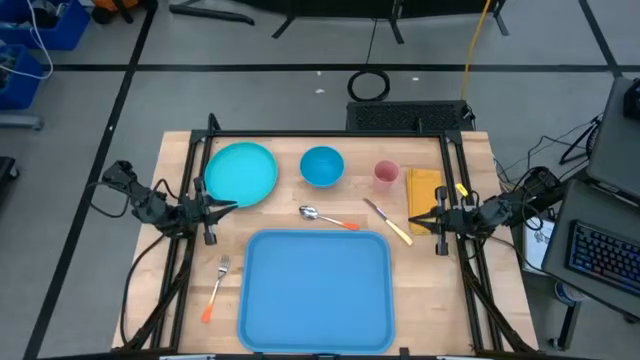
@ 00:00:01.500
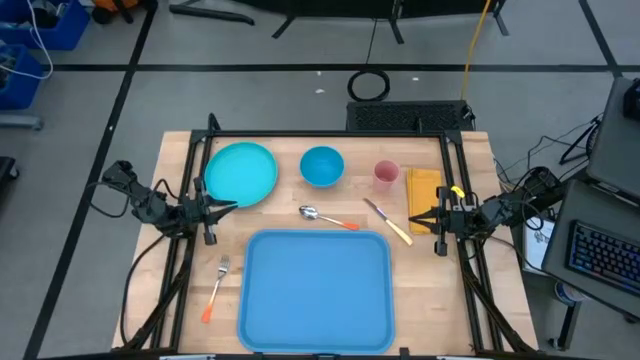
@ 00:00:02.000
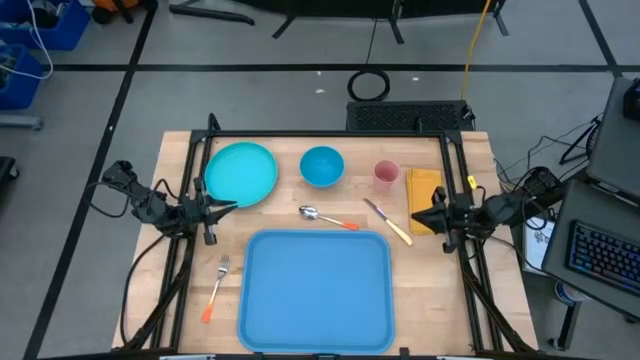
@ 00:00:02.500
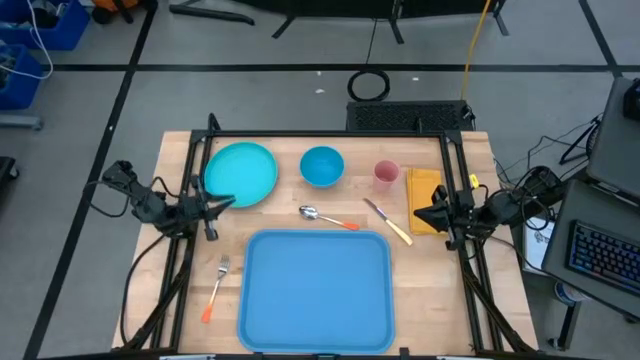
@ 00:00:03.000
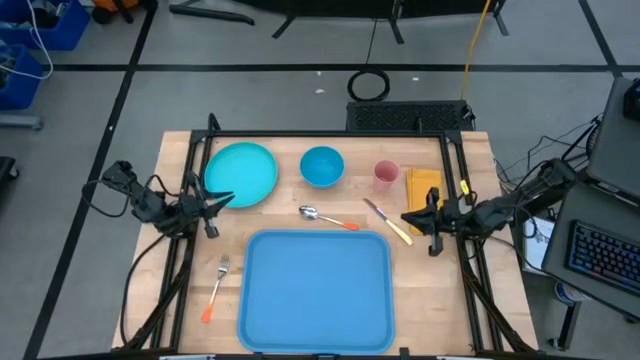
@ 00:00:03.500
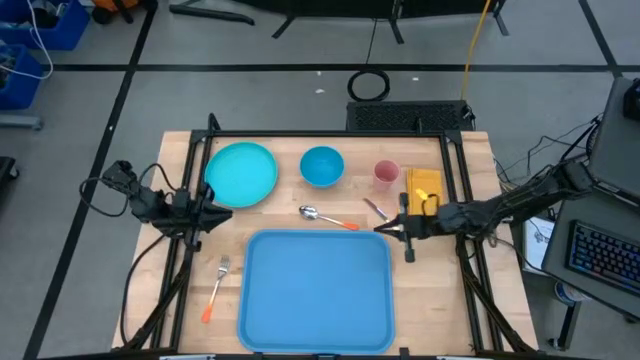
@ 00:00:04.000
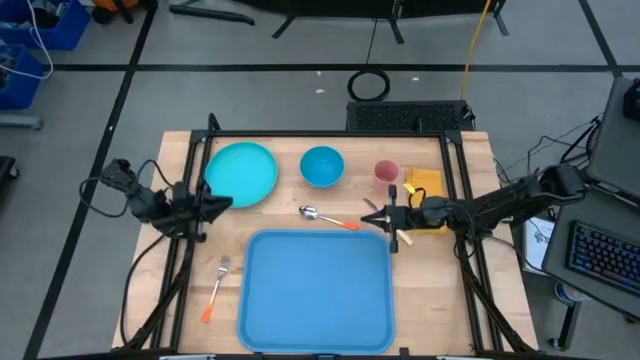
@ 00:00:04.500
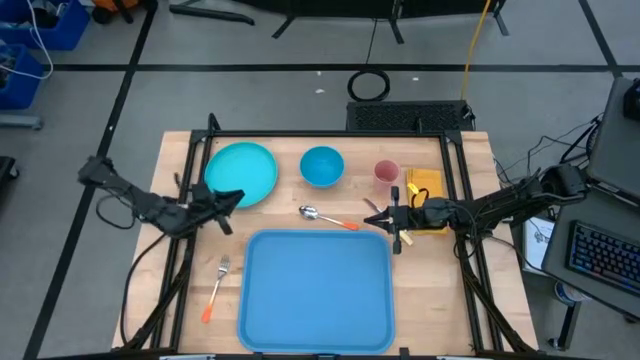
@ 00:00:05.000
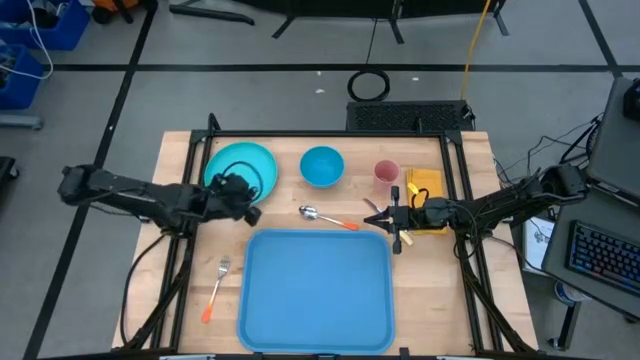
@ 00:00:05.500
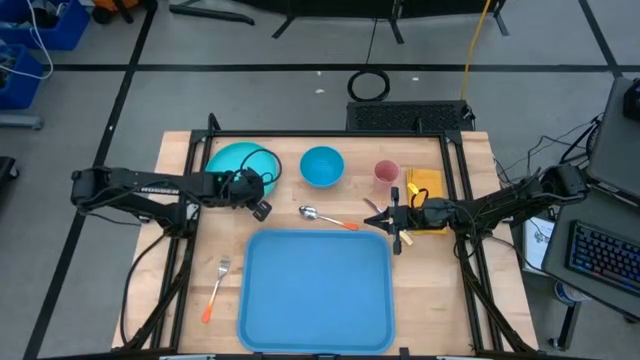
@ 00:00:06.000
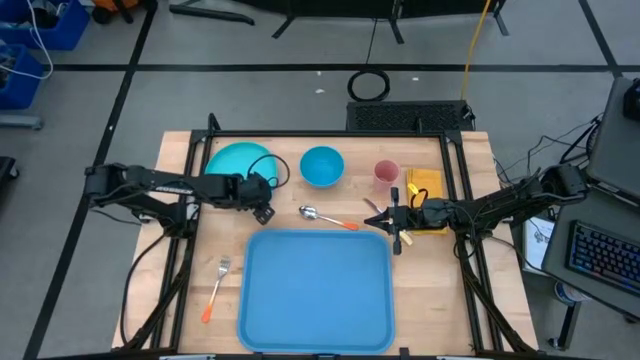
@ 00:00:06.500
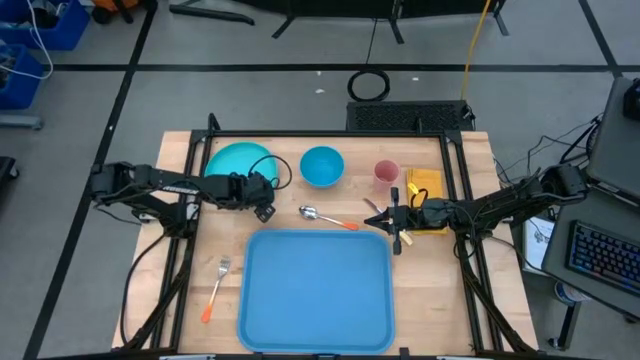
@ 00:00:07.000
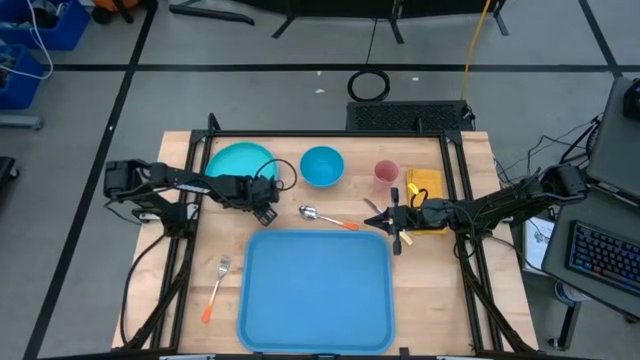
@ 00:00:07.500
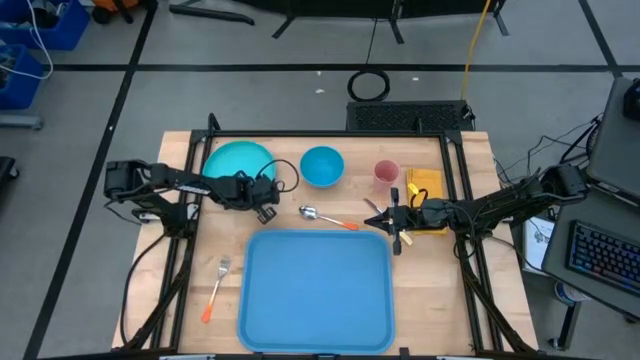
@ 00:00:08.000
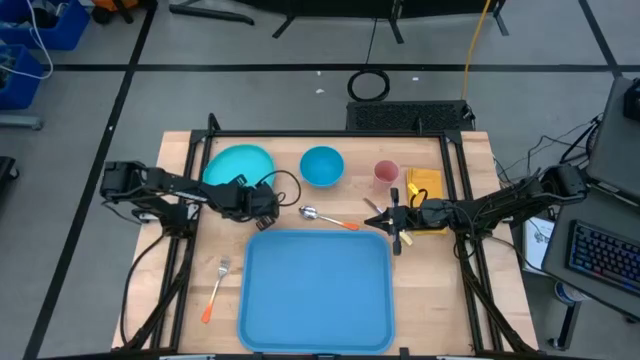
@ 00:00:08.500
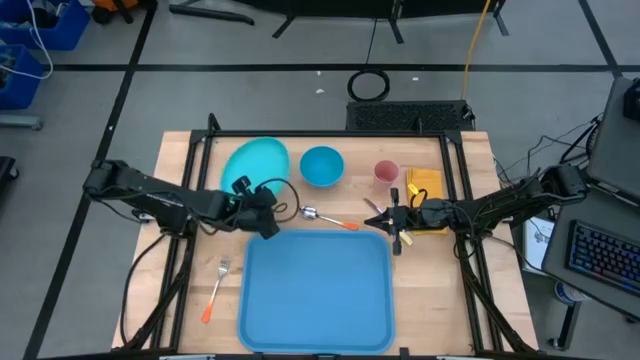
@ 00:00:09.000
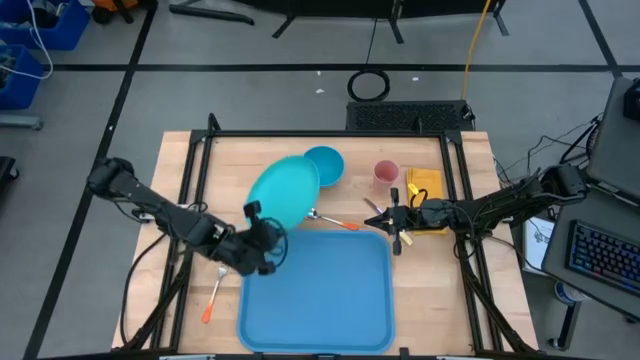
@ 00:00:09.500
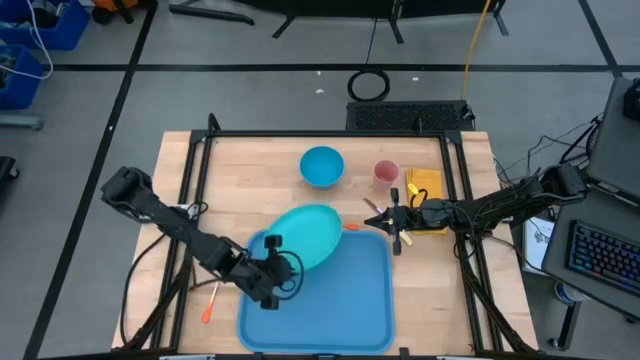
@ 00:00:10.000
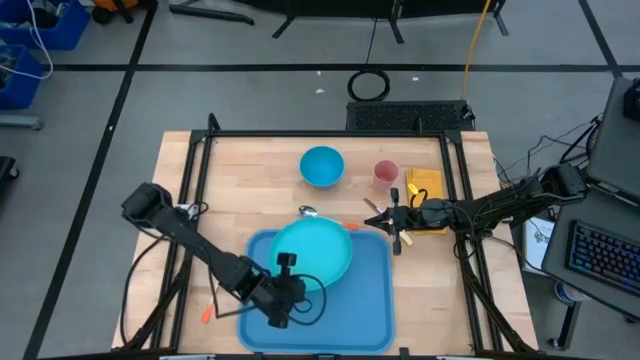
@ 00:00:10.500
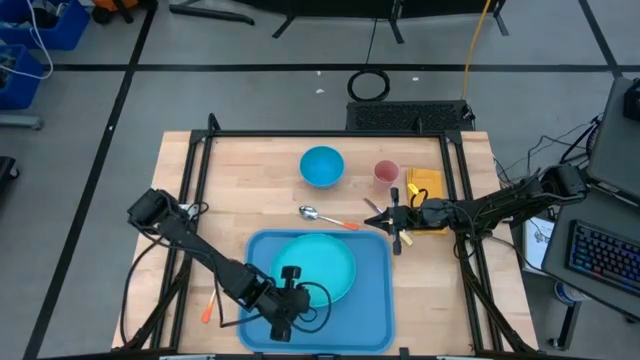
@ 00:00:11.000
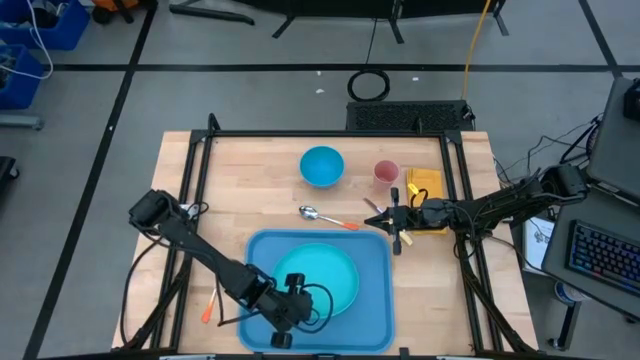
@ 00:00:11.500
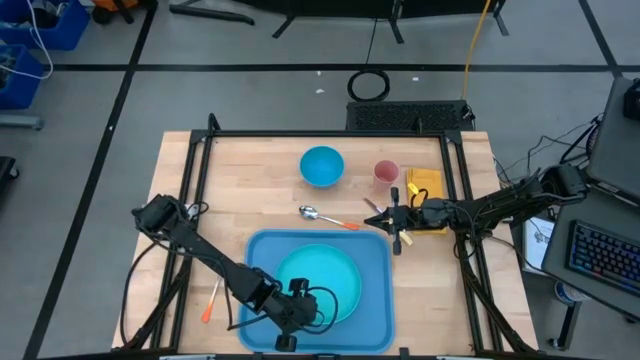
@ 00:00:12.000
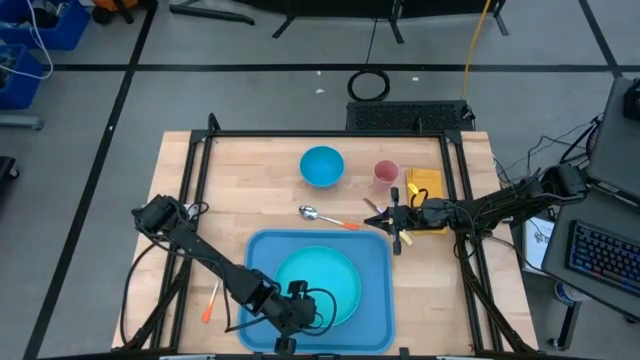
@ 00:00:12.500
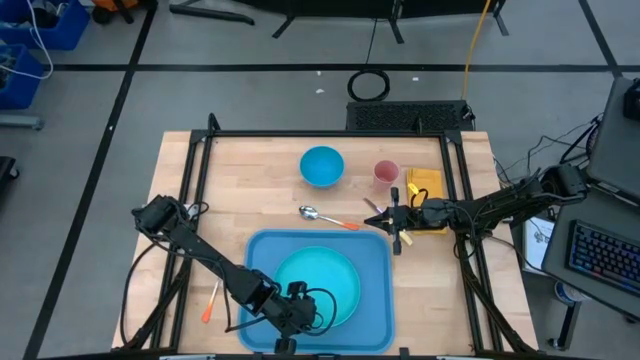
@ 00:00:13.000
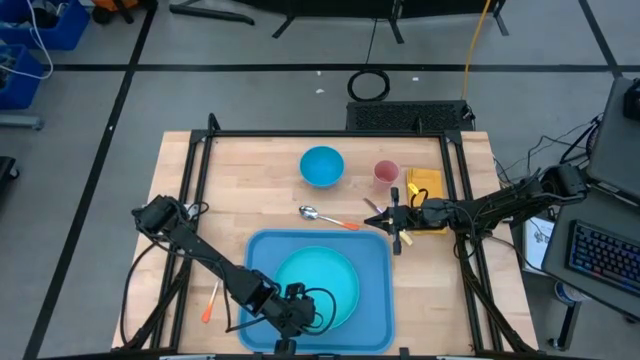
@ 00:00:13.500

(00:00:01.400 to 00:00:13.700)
Task: Set up tray
Put the green plate on the blue tray
